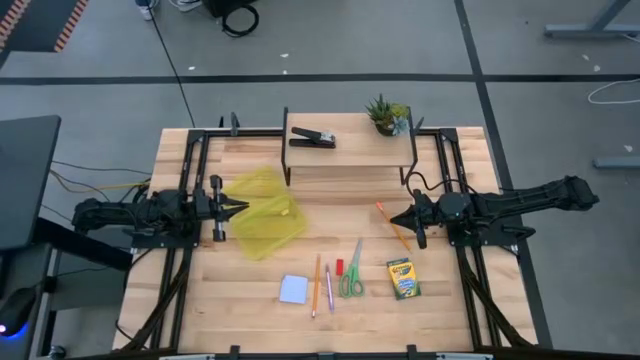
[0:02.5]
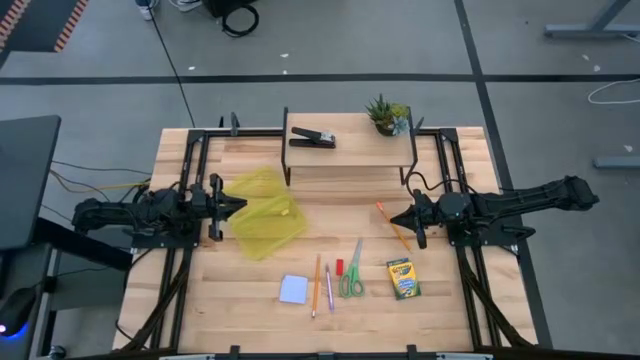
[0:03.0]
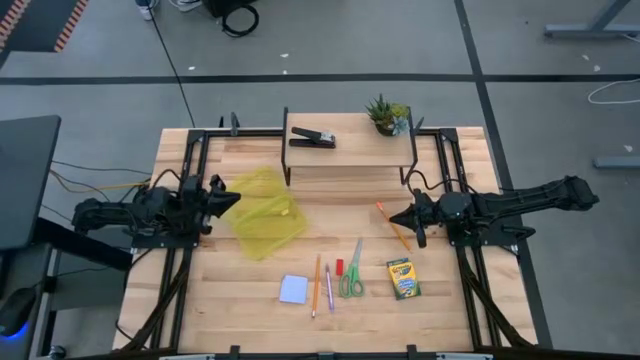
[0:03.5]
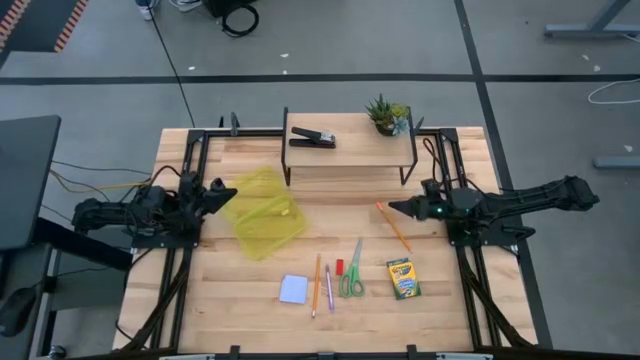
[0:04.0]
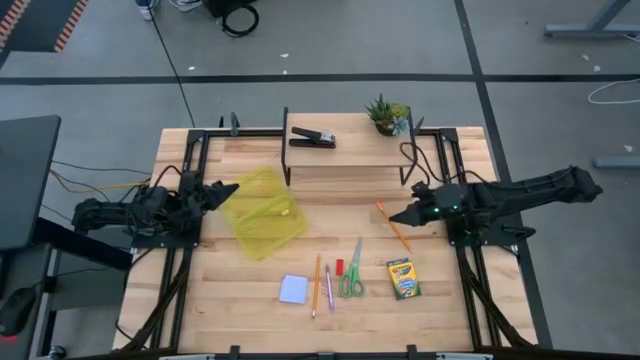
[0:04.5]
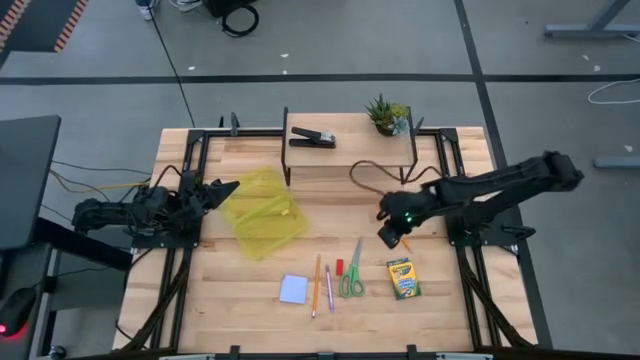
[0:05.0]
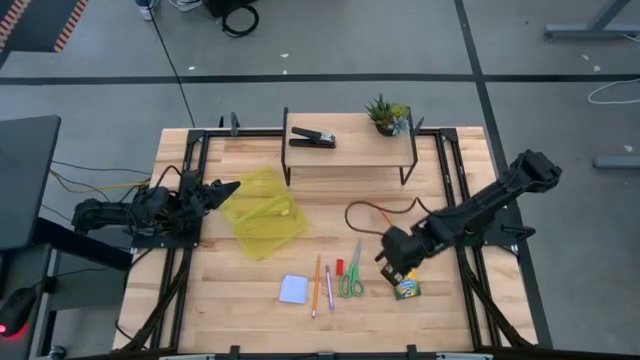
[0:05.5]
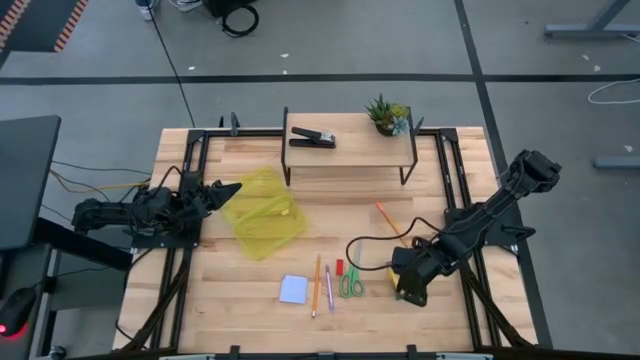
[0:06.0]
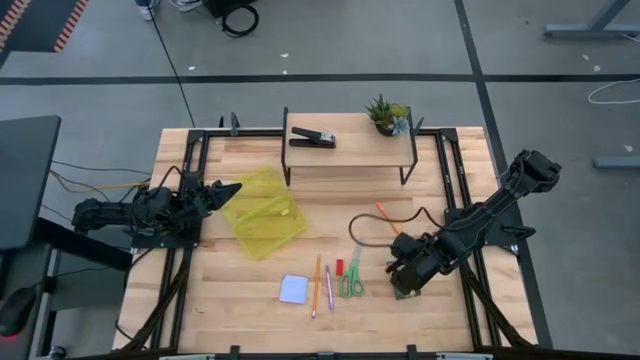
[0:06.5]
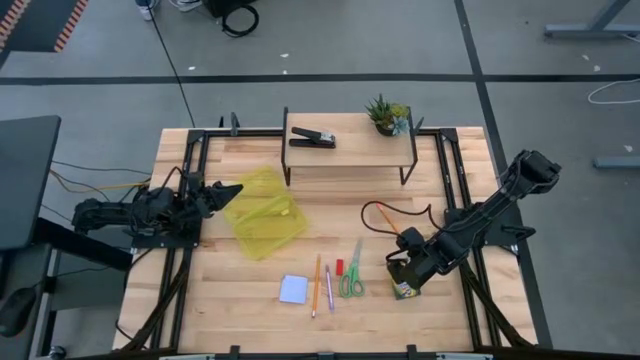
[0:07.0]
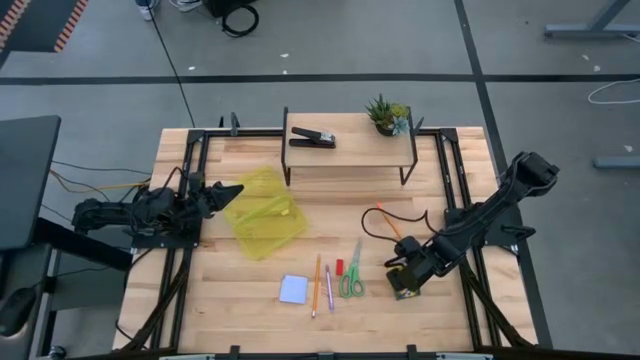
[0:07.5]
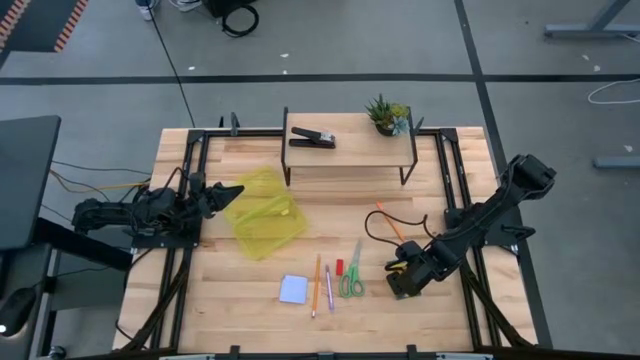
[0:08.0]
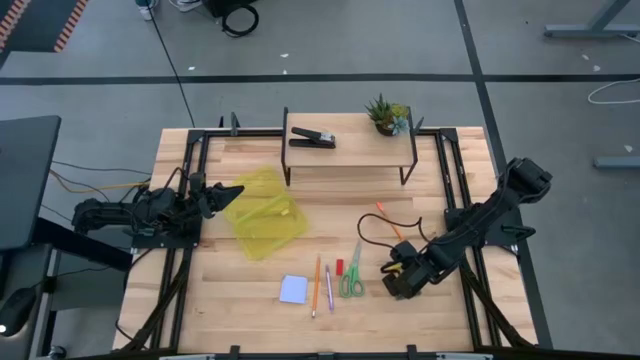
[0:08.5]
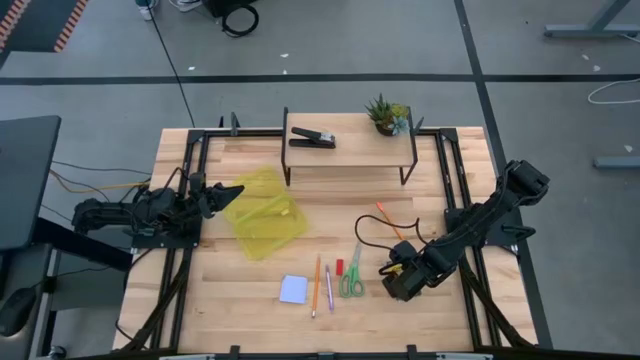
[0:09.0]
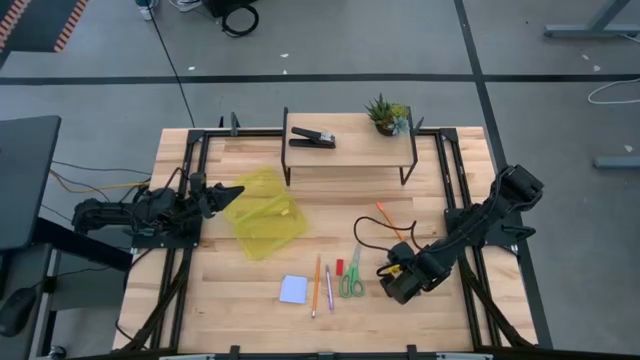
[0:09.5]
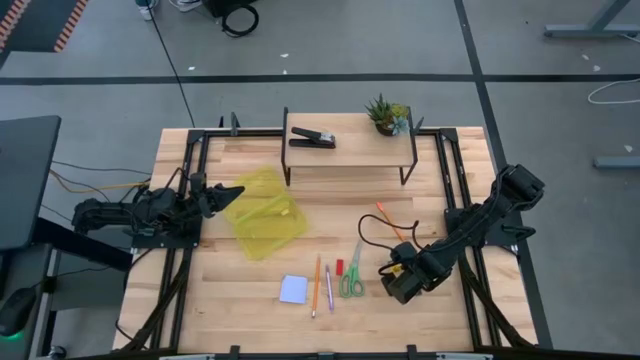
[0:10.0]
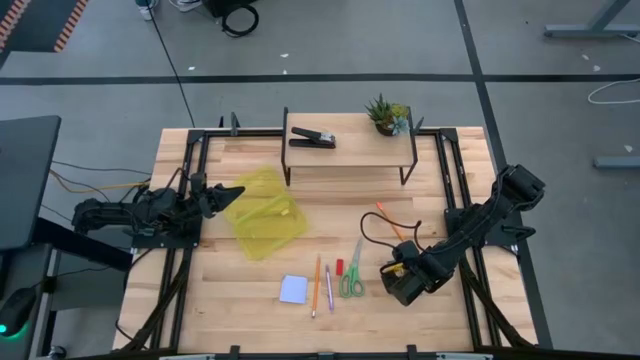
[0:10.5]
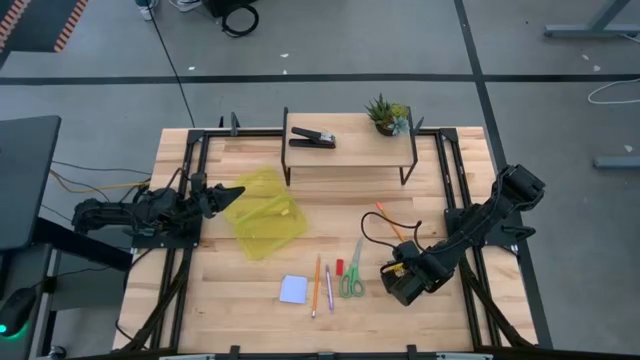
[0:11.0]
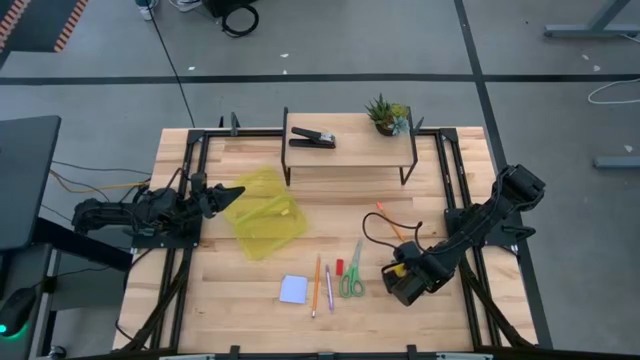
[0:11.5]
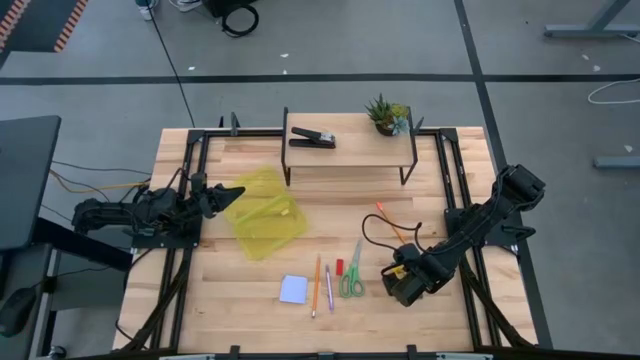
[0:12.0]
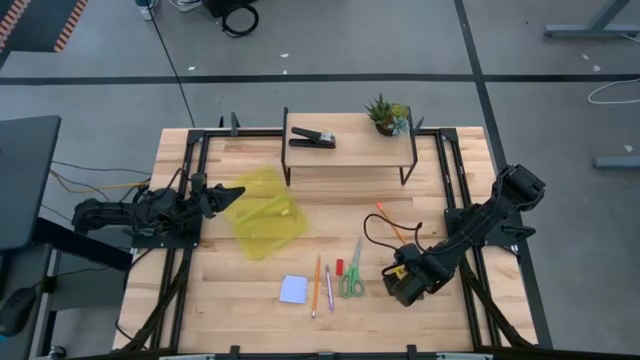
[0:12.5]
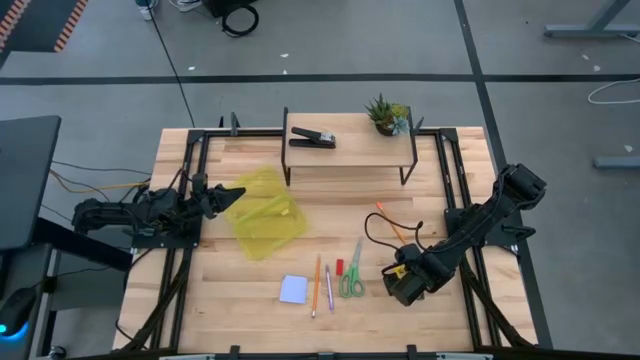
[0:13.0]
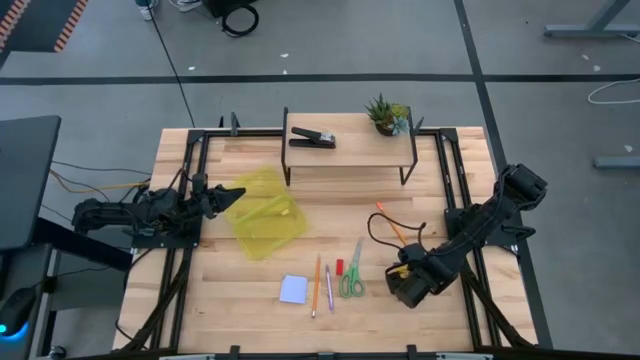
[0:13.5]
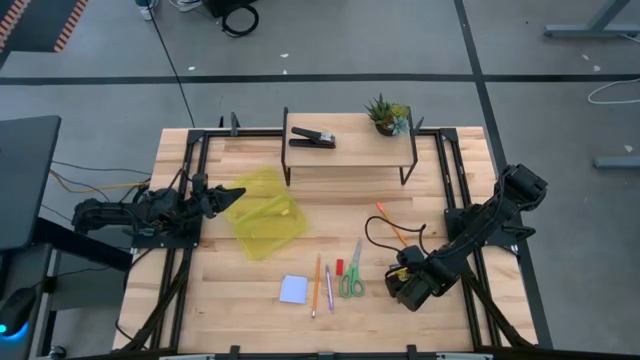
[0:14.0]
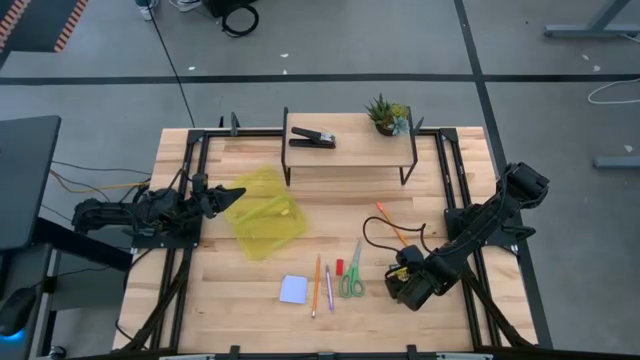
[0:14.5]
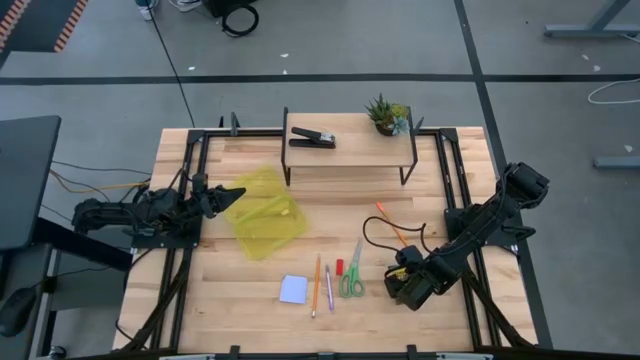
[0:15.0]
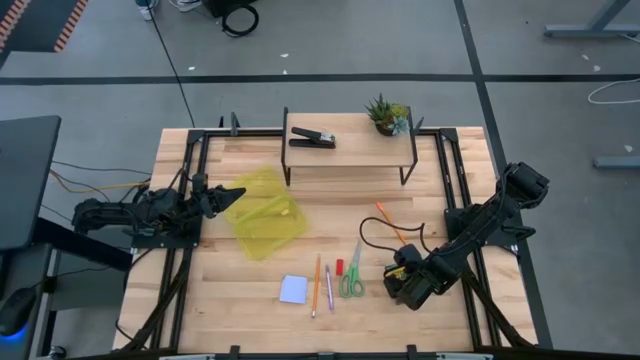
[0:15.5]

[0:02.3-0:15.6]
Task: Pack school essentials
Put the yellow crayon box into the yellow supply box

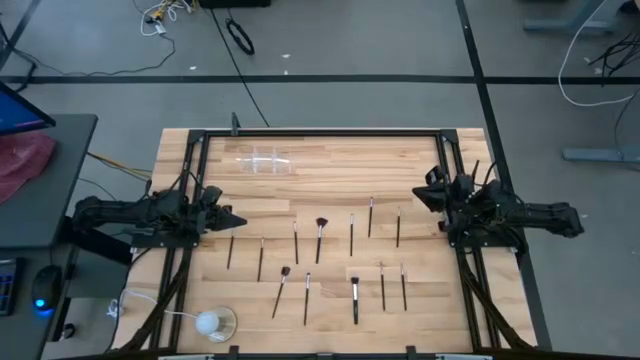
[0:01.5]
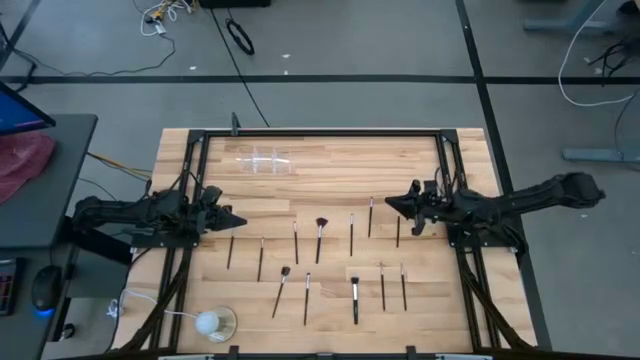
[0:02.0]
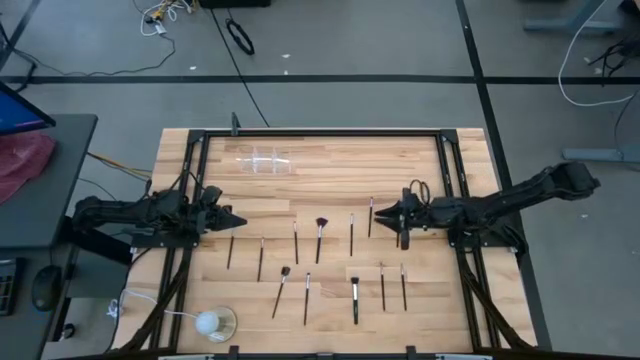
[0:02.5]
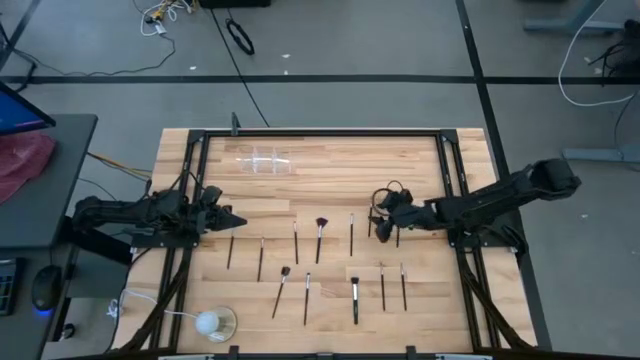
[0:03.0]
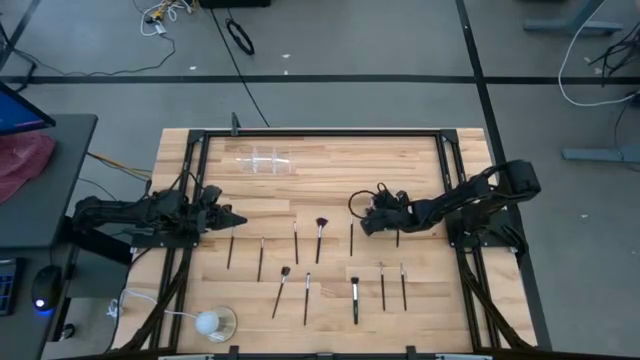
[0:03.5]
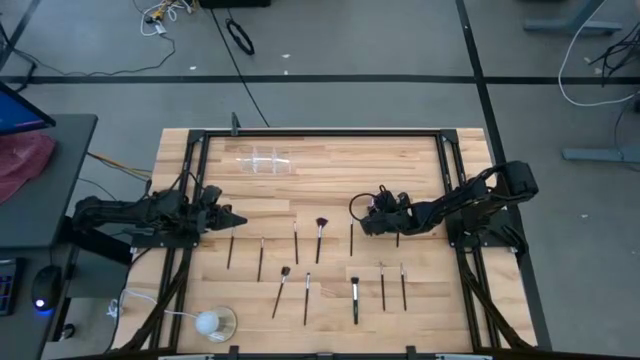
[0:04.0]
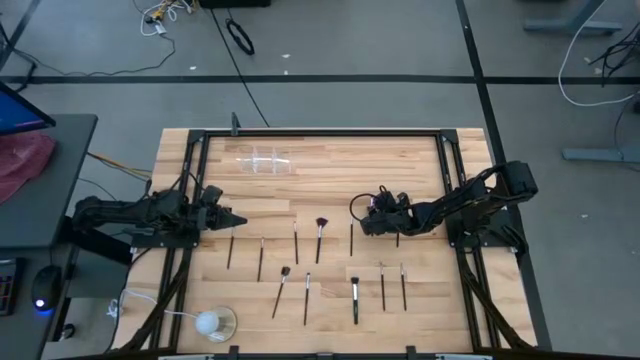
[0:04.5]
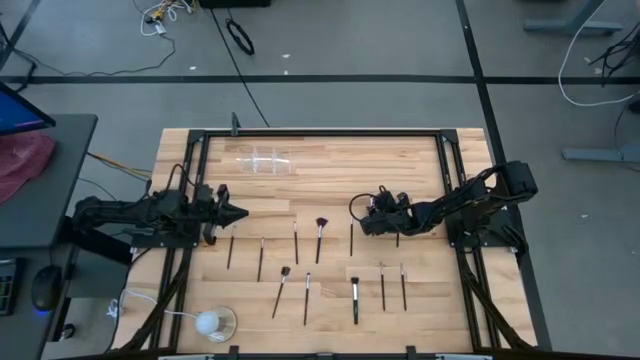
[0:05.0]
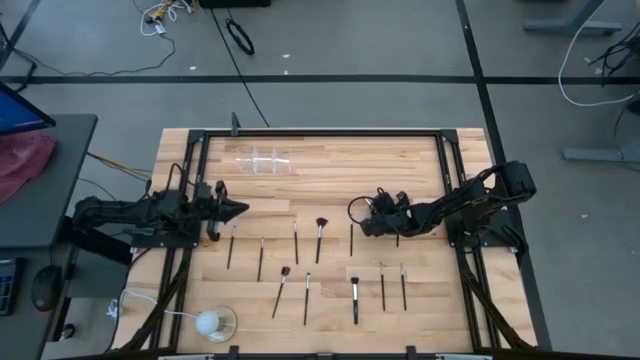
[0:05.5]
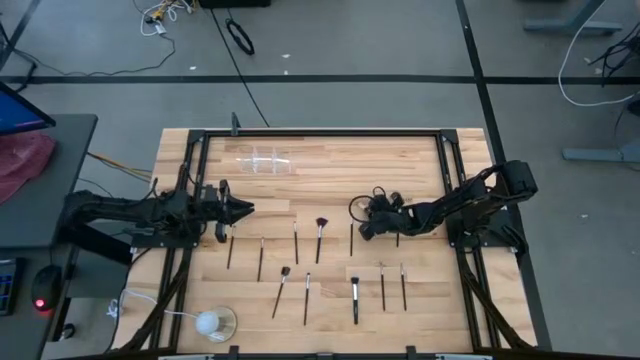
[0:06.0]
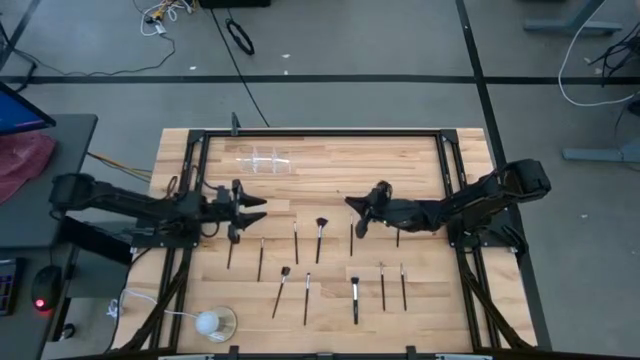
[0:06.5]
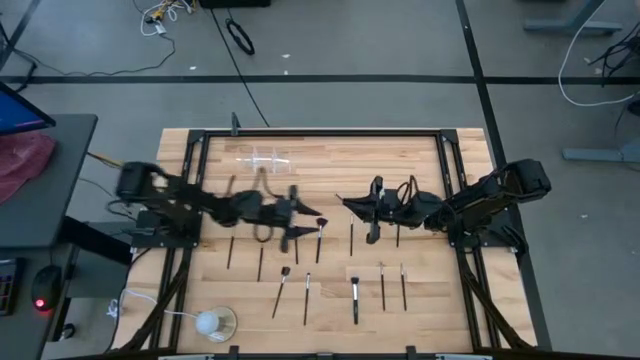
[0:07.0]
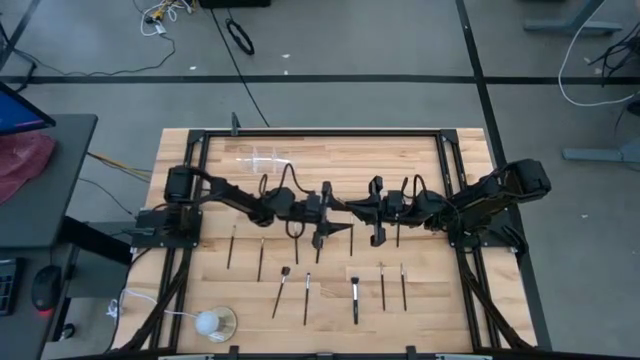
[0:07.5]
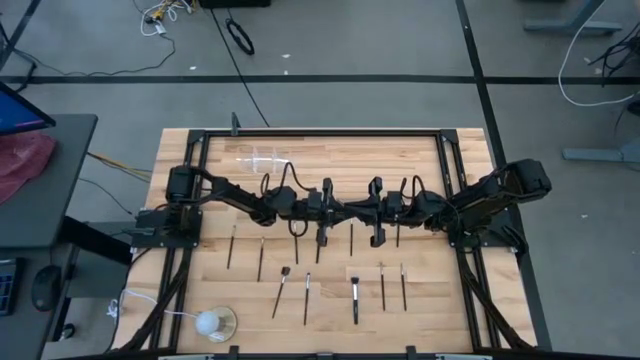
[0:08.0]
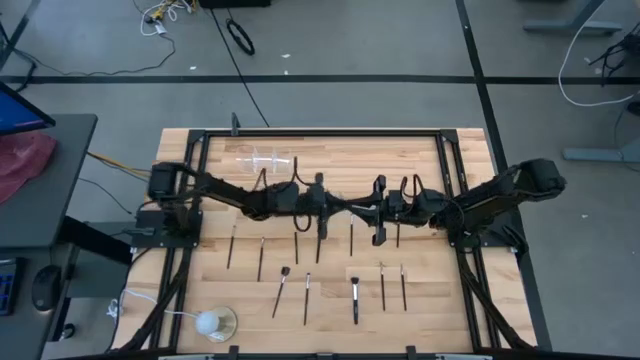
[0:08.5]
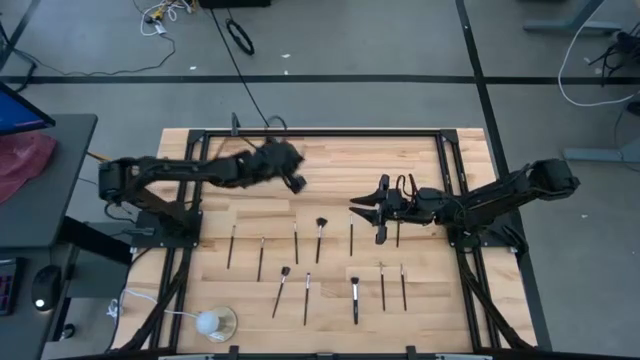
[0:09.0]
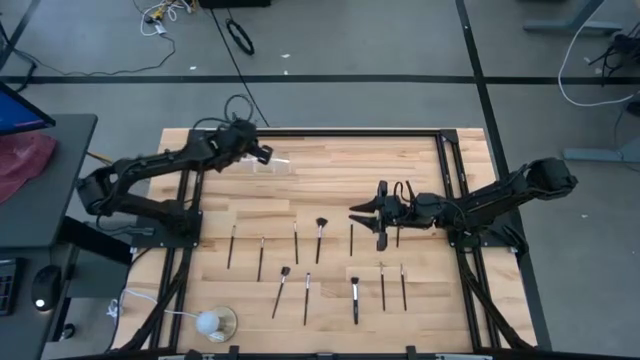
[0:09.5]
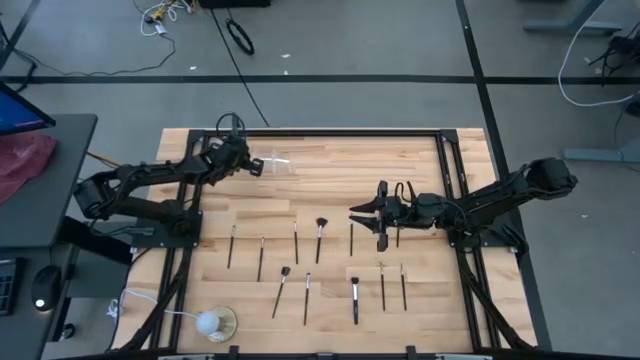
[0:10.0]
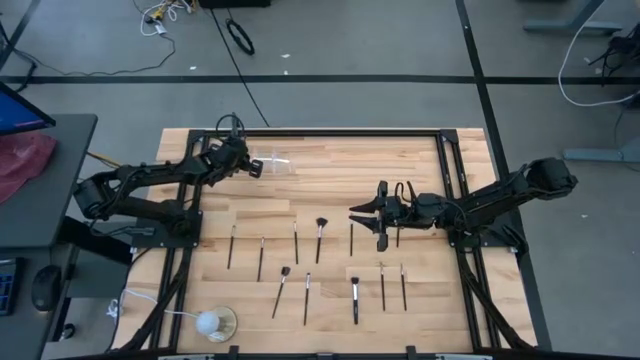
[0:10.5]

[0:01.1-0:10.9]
Task: Put items in baskets/containers
Put the eyeshadow into left section of the transparent organizer
